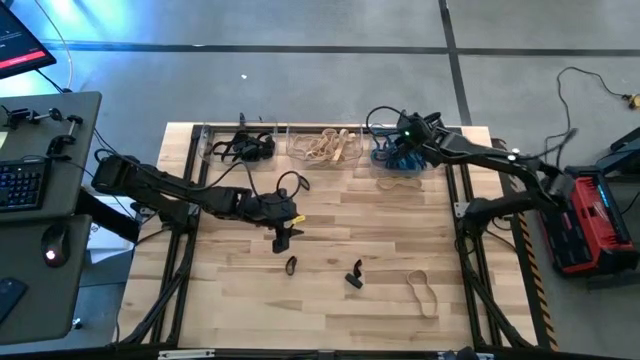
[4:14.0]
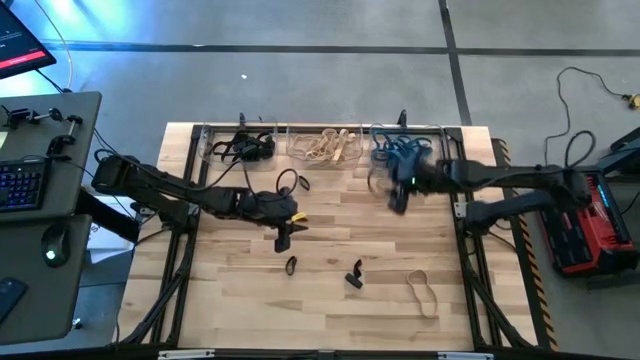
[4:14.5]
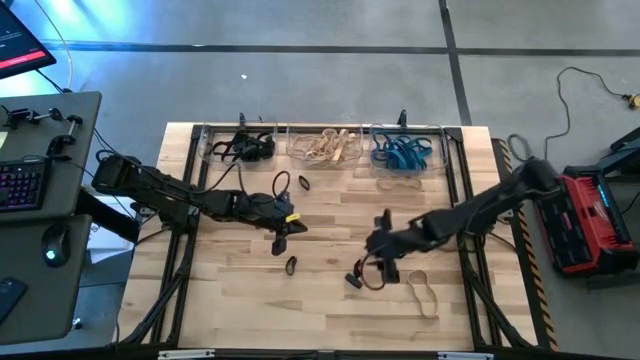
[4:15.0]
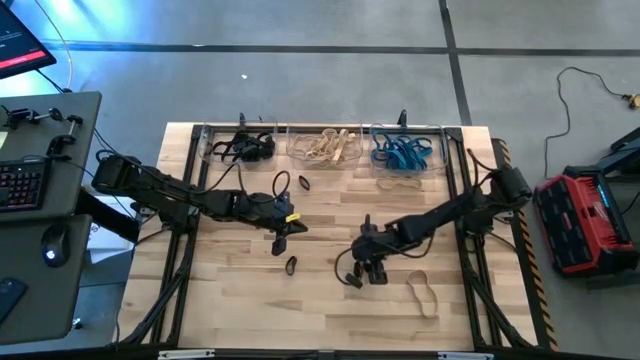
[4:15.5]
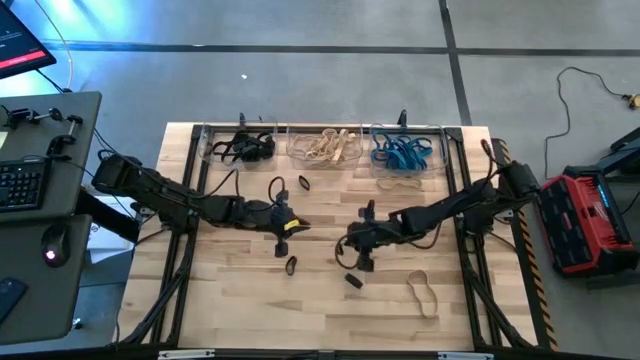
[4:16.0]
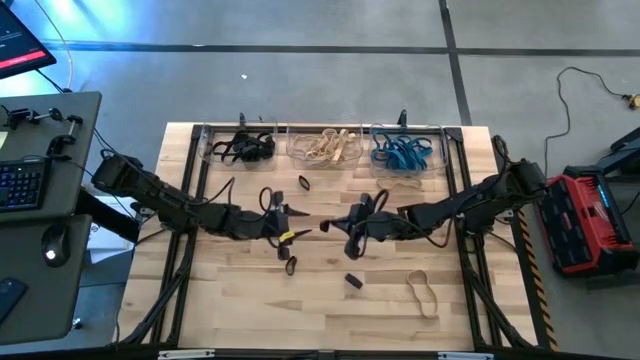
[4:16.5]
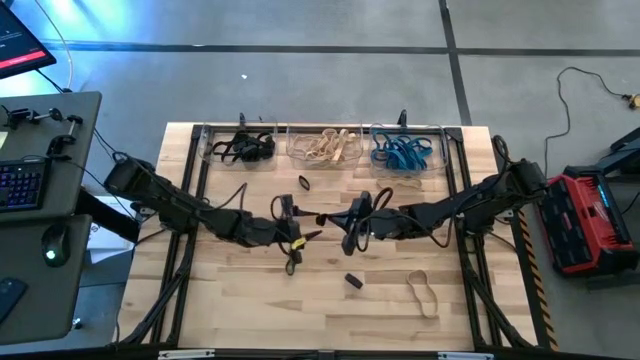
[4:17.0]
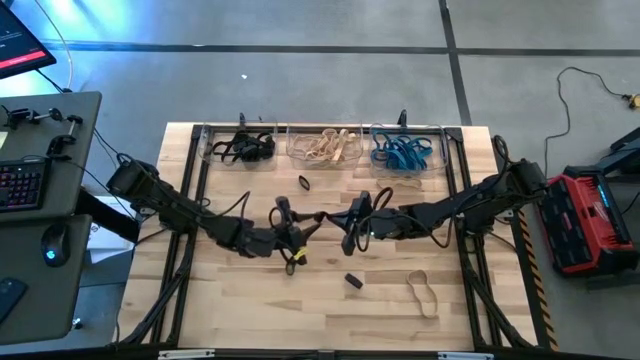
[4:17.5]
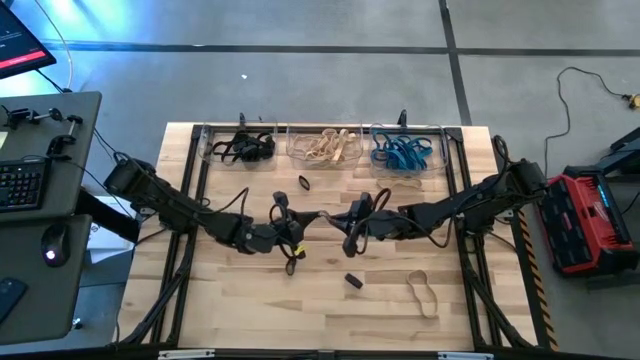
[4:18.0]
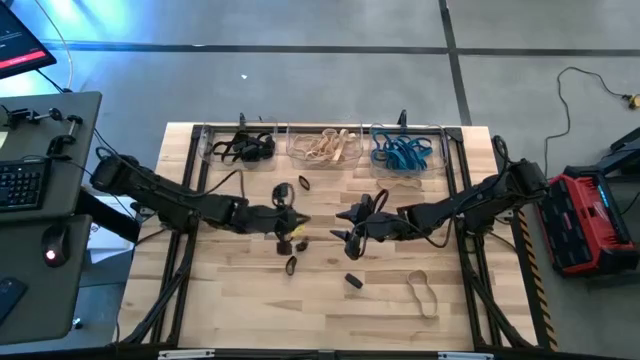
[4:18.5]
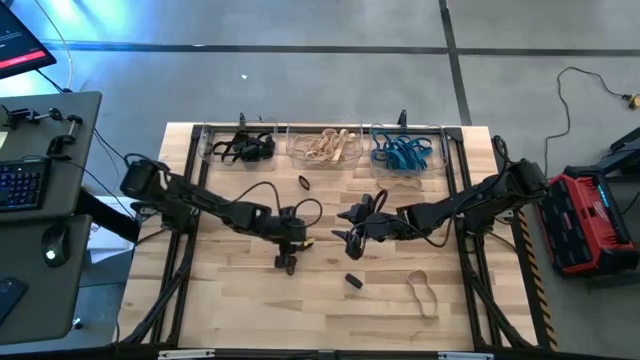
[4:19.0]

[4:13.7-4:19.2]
Task: Sort rubber bands into baskets
Put the black rubber band into the left transparent bin

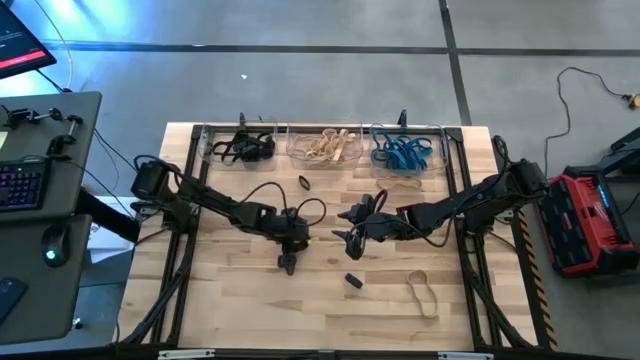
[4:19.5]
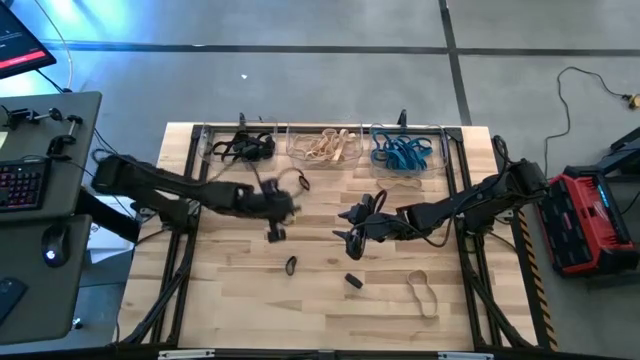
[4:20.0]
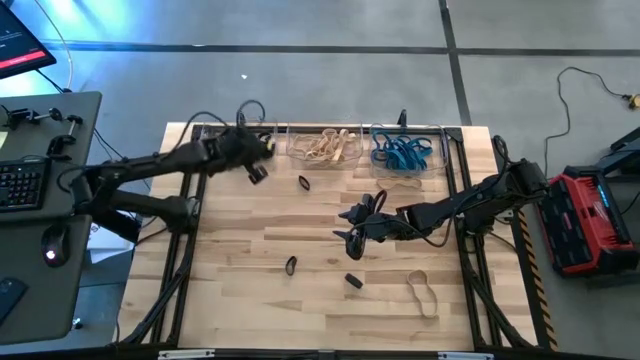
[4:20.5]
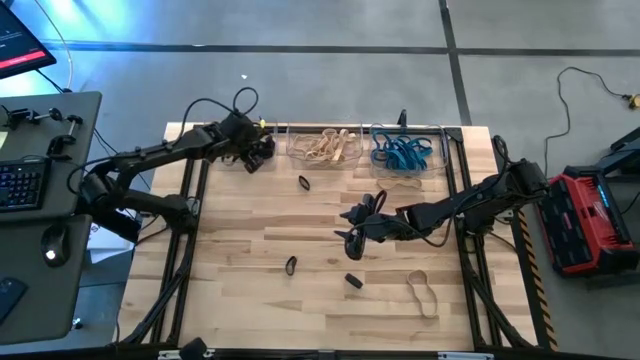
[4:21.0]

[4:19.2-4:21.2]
Put the black rubber band into the left transparent bin

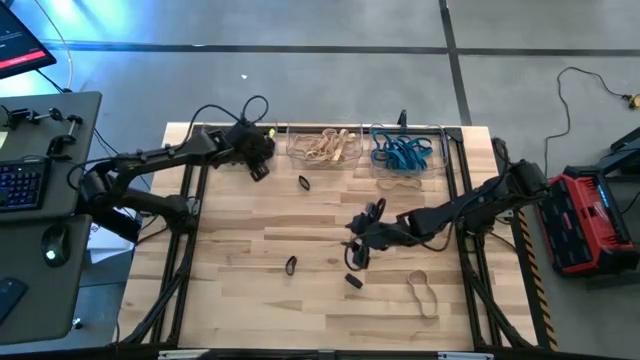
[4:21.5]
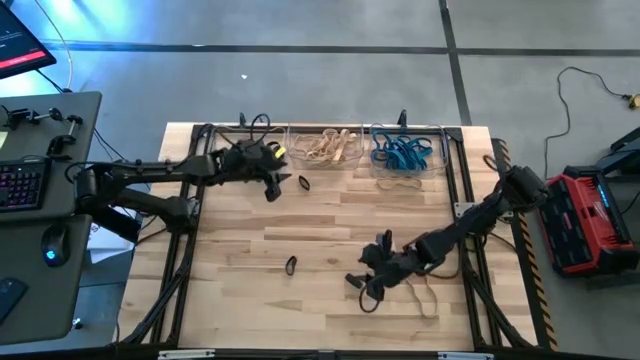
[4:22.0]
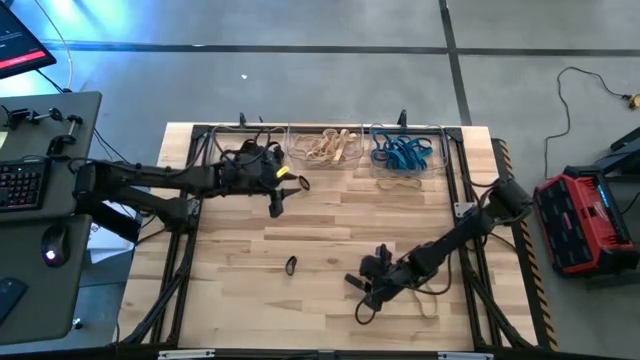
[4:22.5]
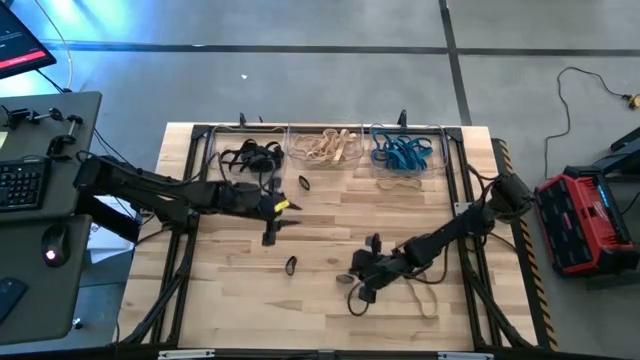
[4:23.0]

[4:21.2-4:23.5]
Put the black rubber band into the left transparent bin

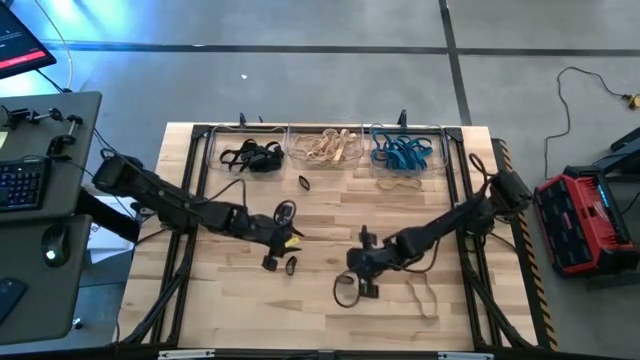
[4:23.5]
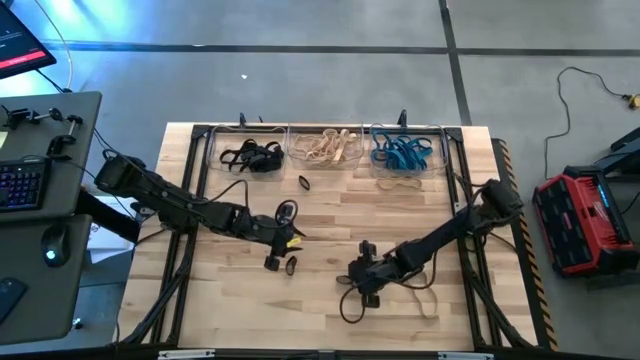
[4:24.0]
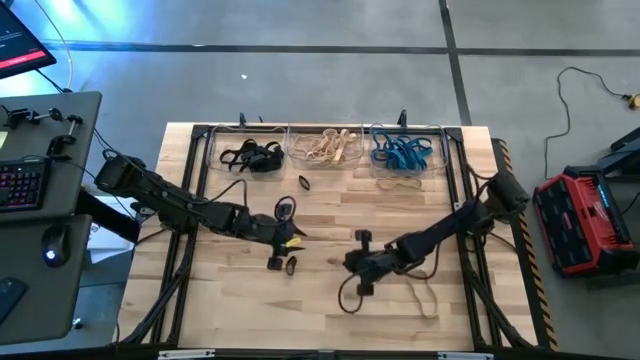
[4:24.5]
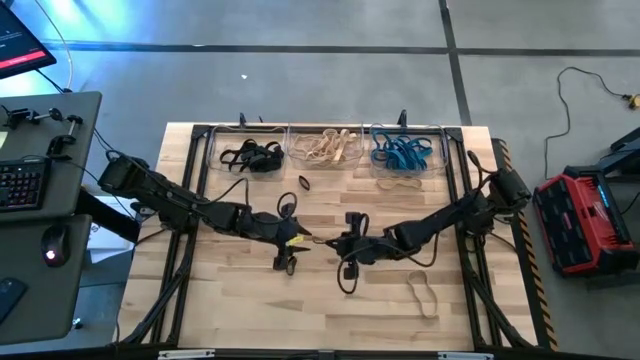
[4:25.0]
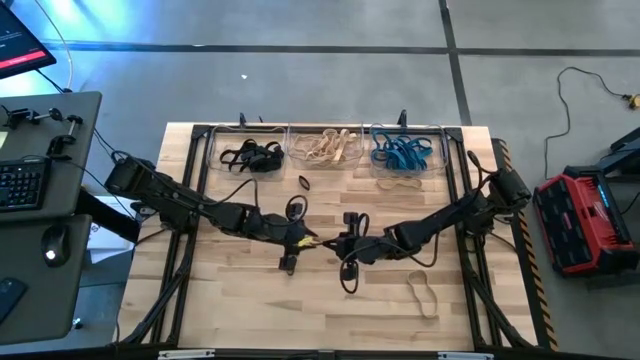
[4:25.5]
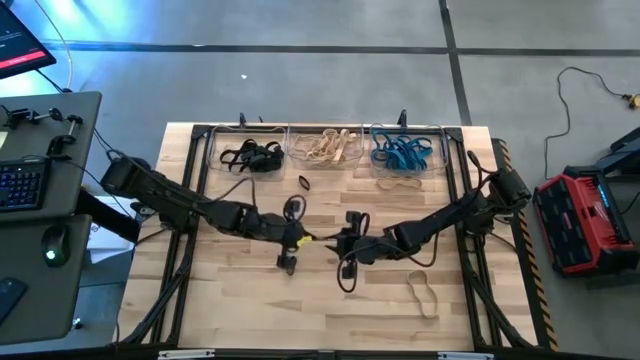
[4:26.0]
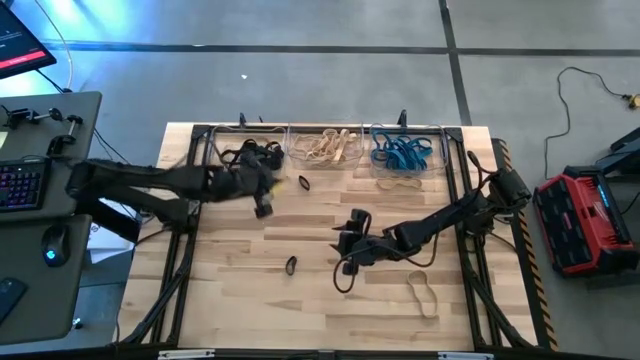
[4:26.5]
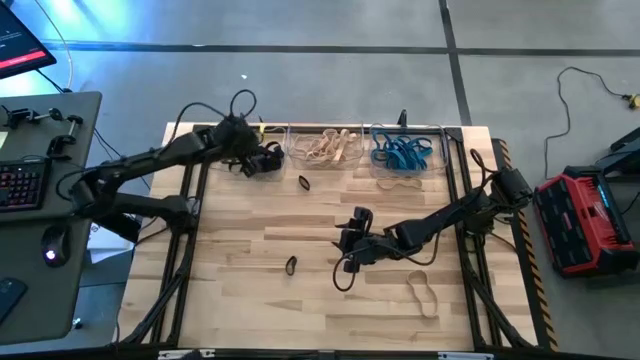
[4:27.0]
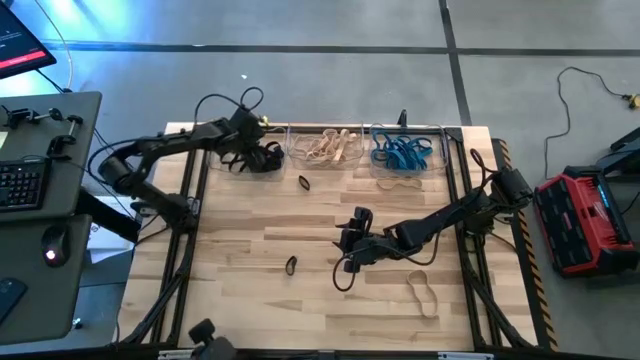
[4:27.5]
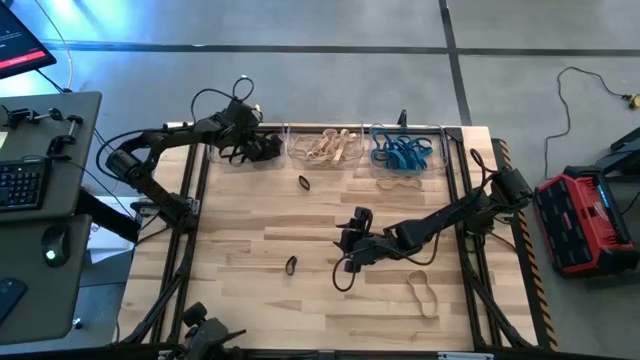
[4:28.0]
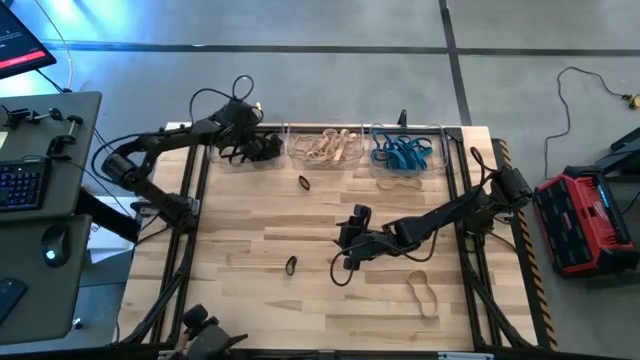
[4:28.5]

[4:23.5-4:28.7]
Put the black rubber band into the left transparent bin

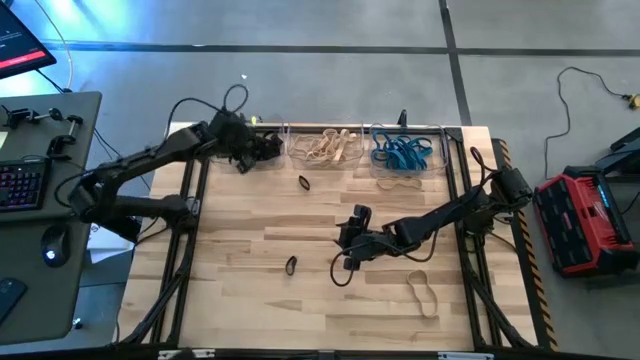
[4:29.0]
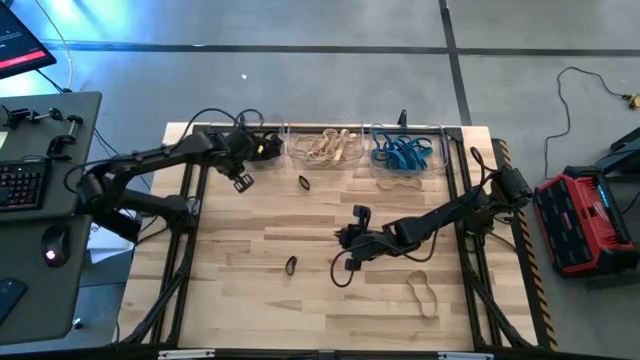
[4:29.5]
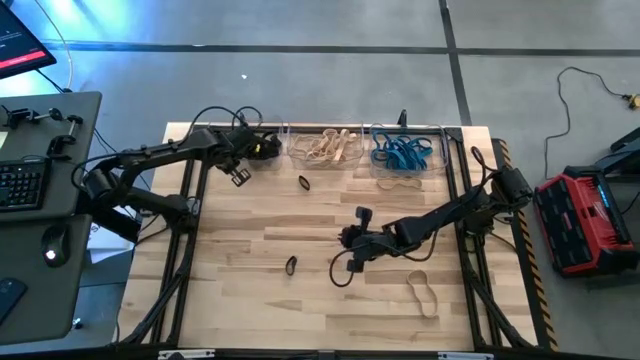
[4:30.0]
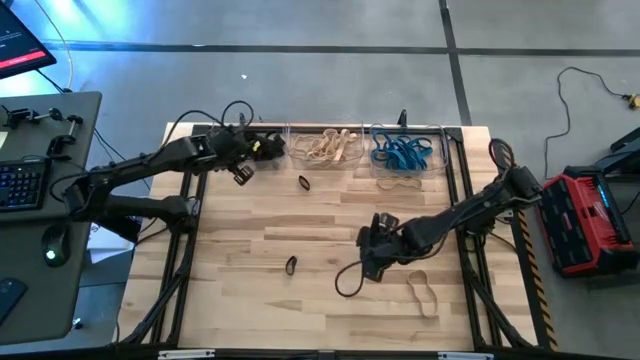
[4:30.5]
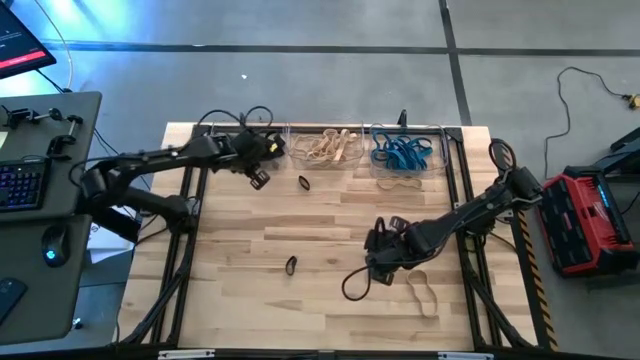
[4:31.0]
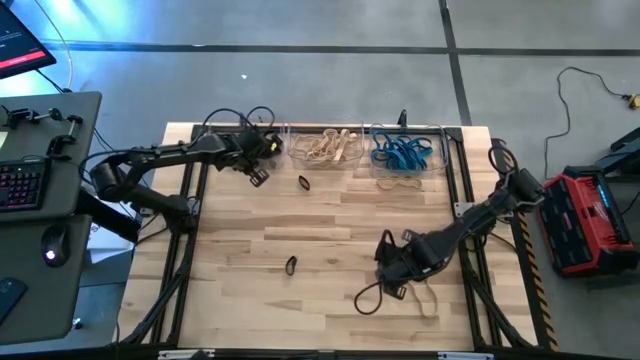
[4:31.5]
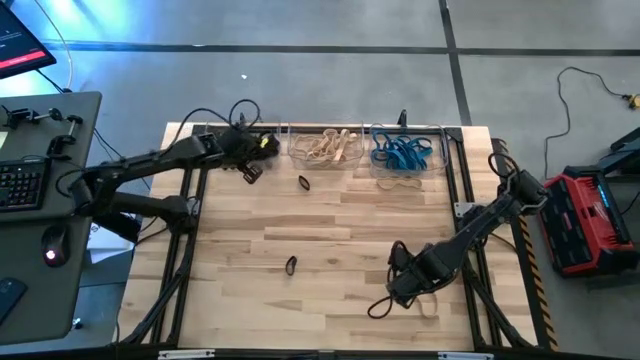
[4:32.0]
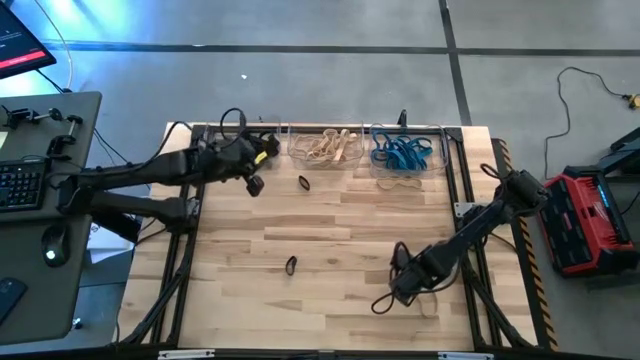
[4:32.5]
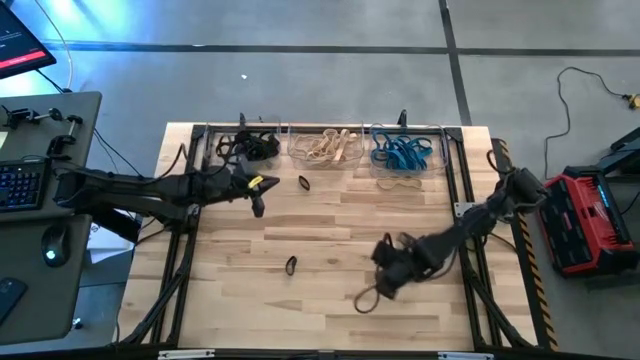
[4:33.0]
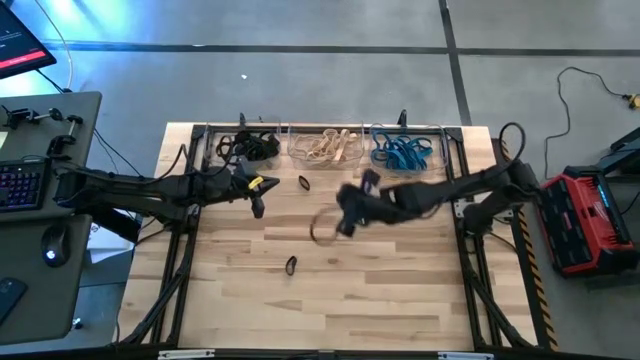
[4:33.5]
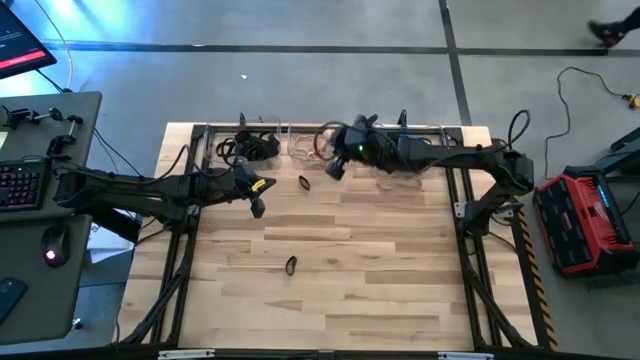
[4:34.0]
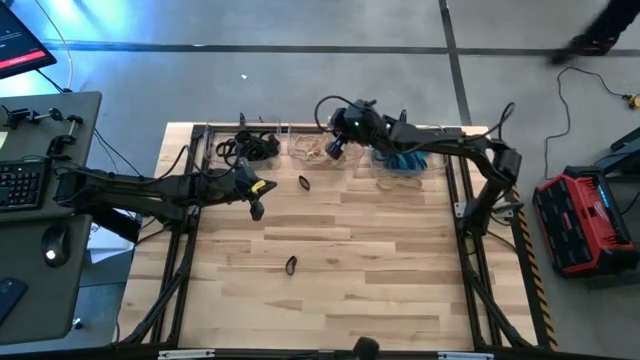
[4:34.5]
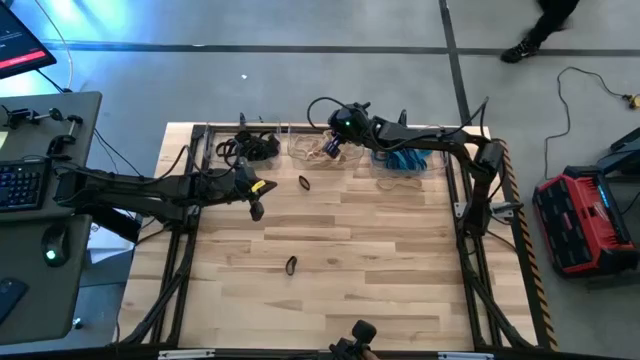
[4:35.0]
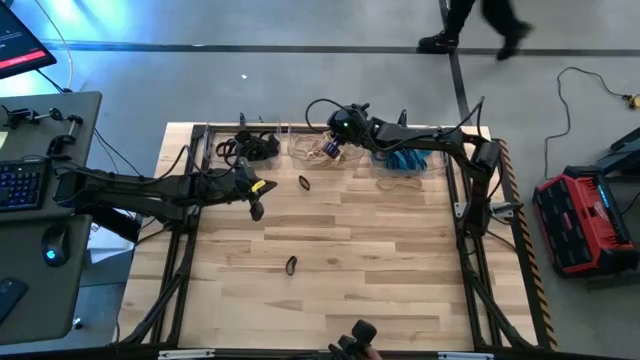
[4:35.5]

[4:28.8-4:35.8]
Put the brown rubber band into the middle transparent bin
